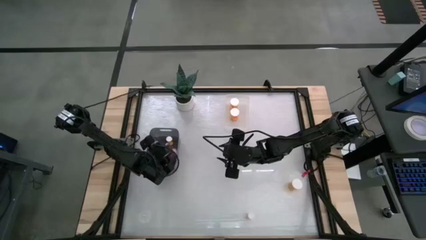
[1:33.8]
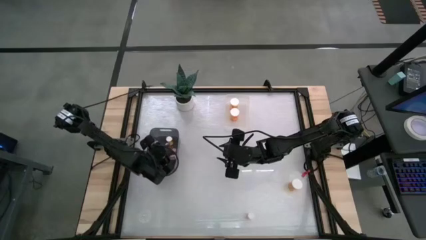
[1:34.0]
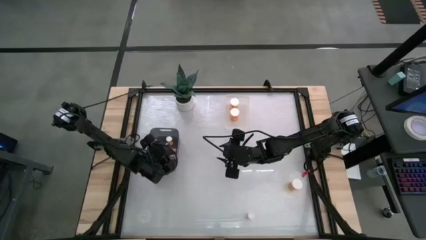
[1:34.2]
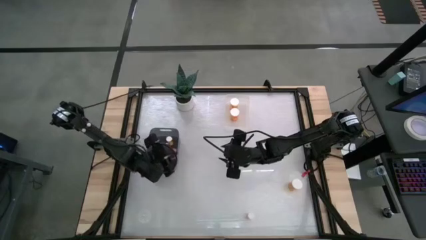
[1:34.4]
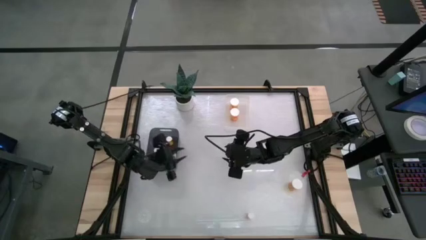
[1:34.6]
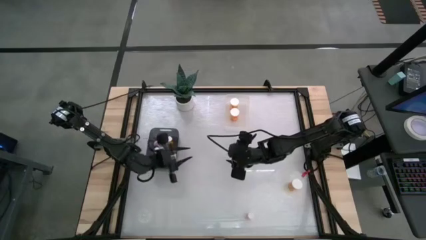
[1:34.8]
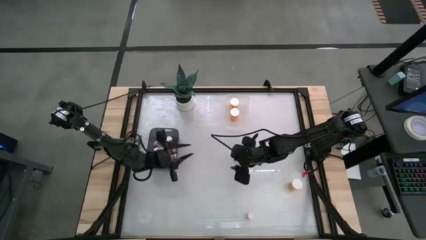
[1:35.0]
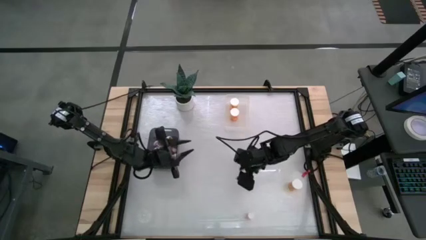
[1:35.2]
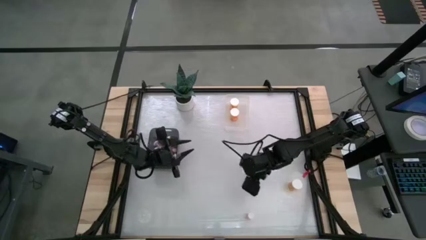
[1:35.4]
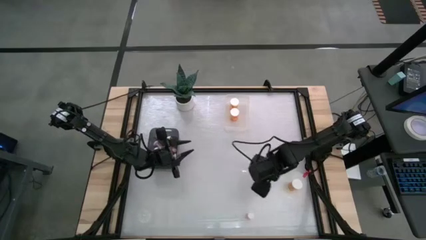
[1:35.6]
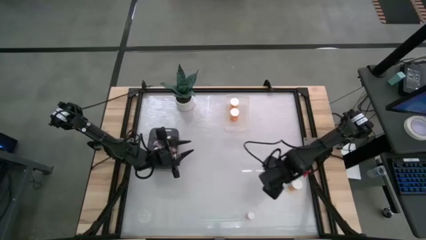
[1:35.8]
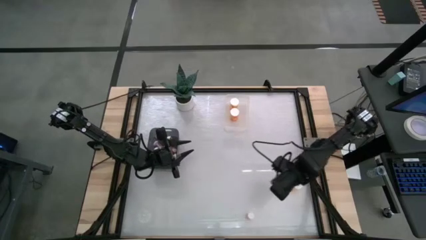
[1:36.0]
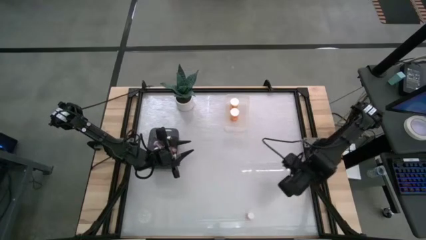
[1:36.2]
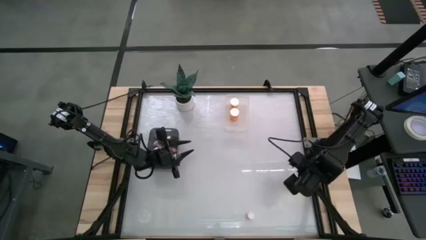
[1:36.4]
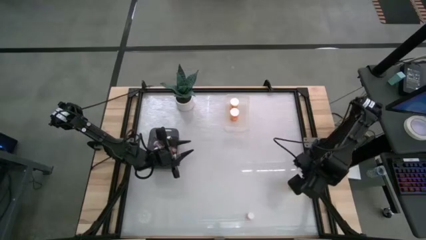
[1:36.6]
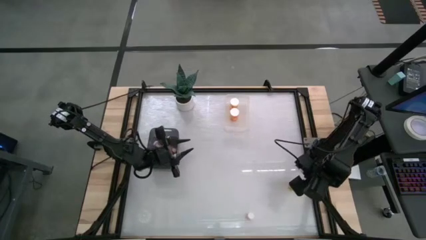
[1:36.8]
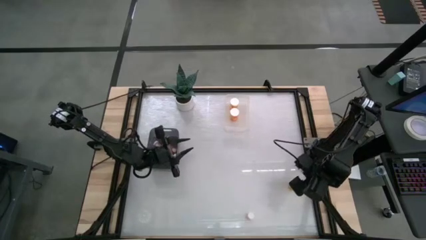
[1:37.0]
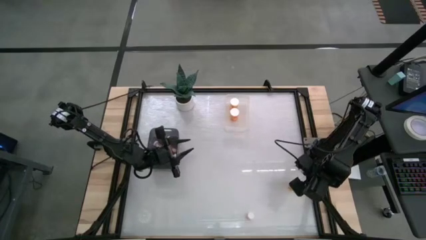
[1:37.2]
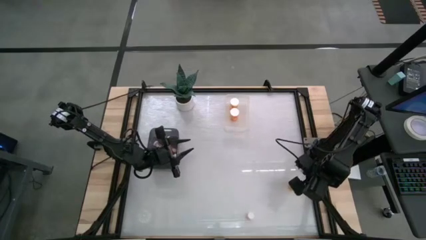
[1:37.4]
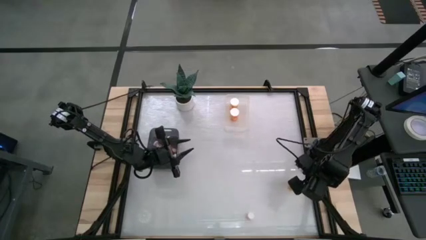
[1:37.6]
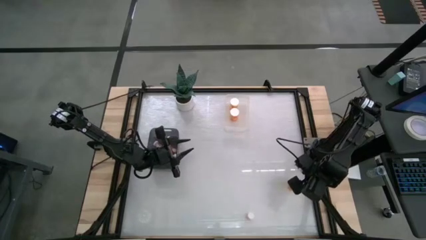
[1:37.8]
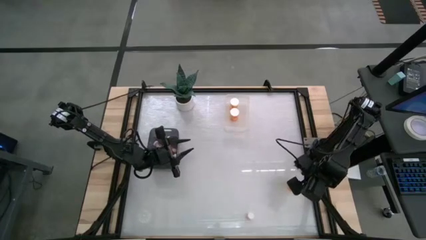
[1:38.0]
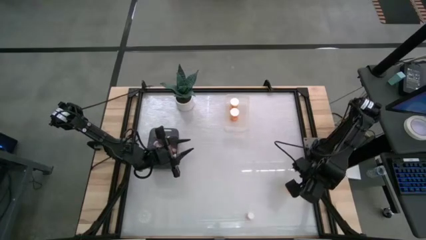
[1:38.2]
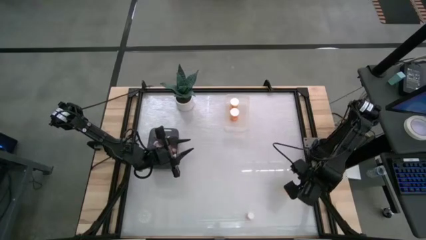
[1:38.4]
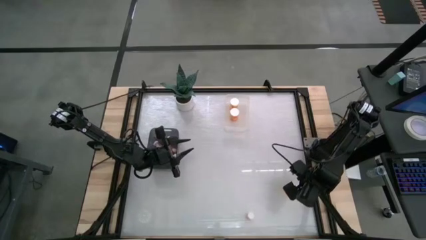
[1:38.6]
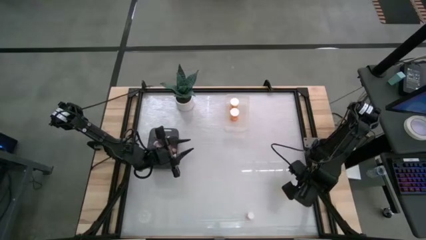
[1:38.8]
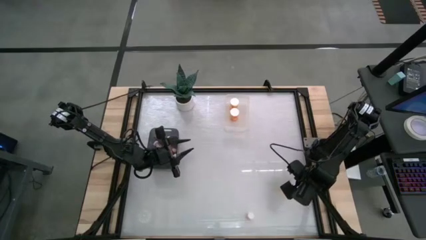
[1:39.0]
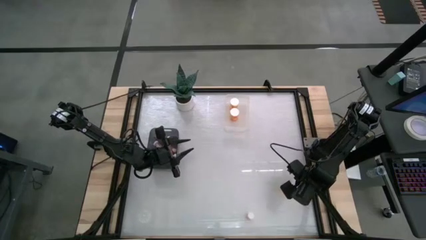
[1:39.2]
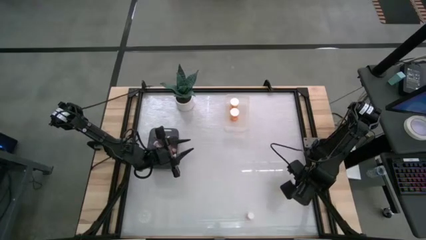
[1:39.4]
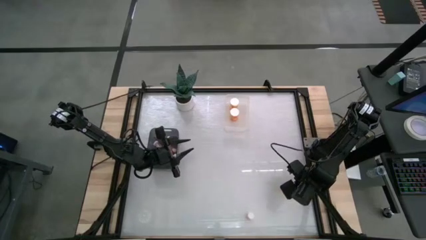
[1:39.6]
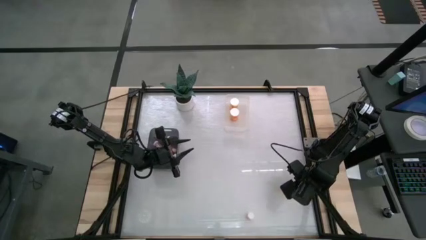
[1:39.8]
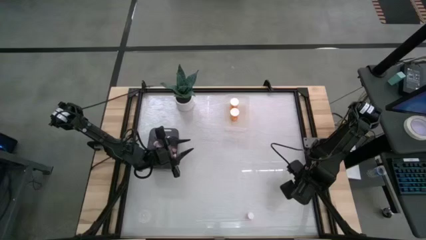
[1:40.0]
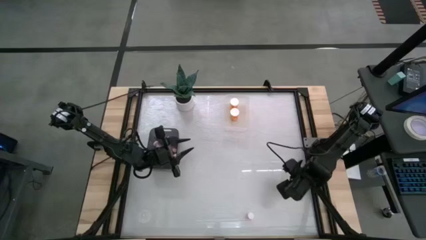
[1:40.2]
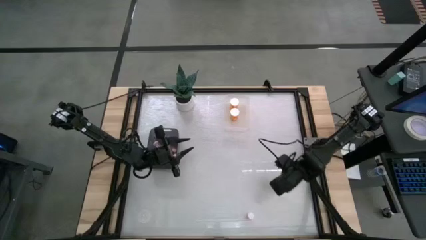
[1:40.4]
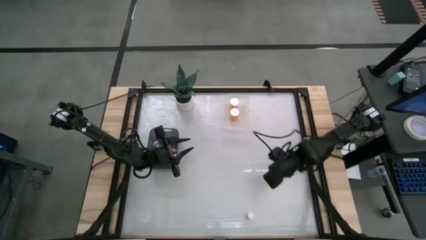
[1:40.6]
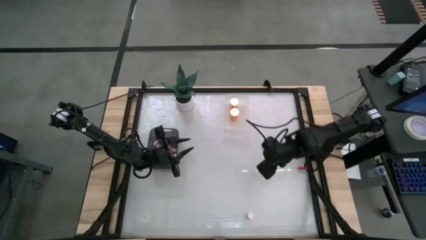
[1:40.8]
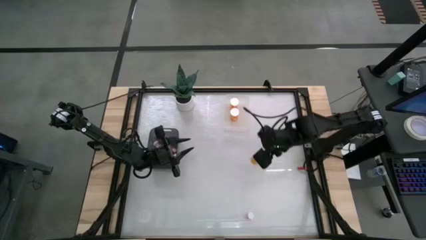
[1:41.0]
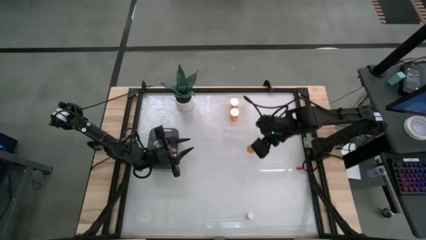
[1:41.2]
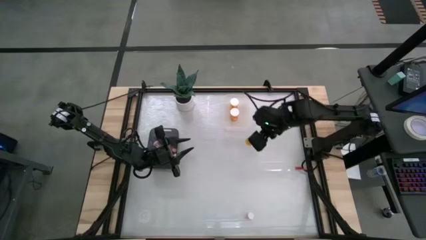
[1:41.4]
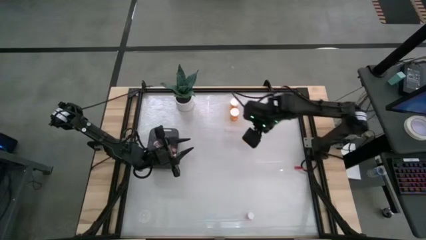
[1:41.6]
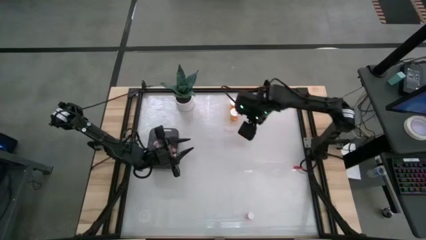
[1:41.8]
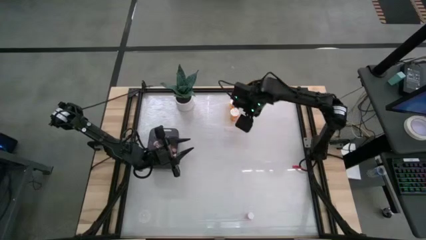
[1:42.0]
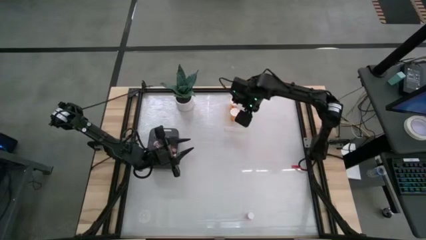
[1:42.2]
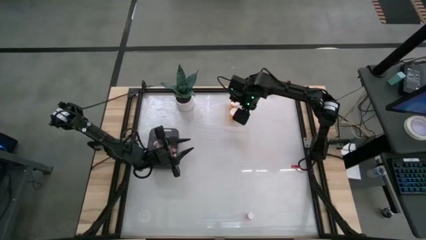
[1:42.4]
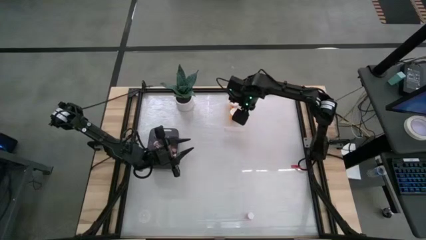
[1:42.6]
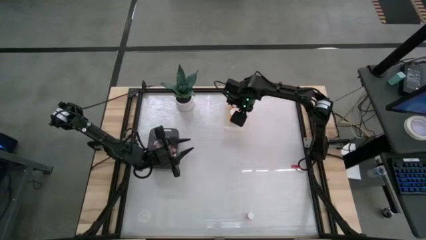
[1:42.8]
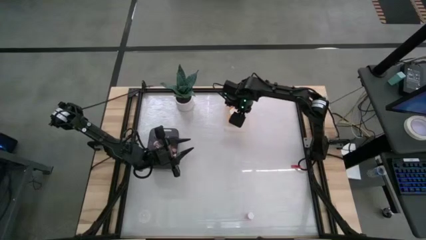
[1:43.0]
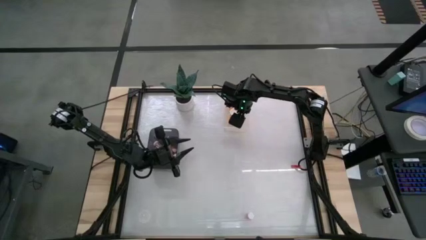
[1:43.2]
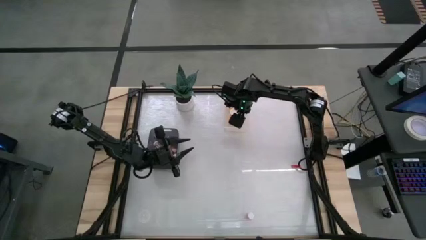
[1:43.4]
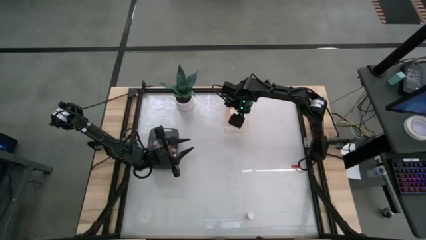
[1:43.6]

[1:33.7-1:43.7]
Task: Pick and place medicine bottles into bin by pill shape (circle, oval)
Put the big orange pill bottle into the transparent bin

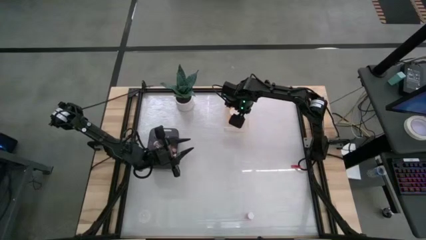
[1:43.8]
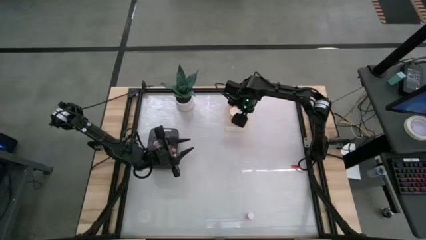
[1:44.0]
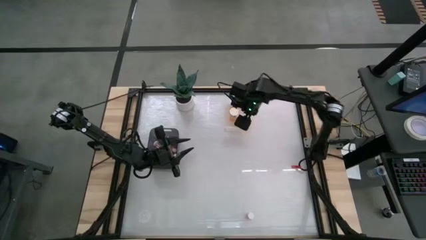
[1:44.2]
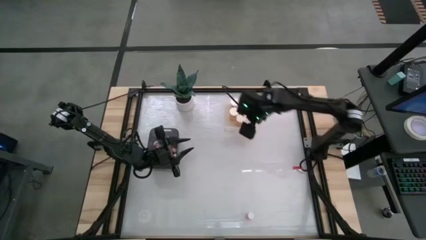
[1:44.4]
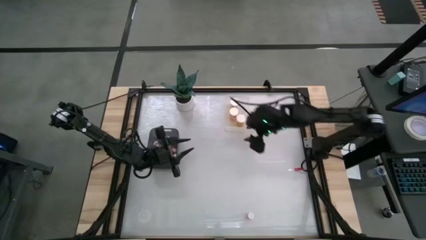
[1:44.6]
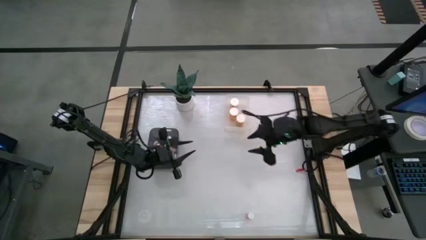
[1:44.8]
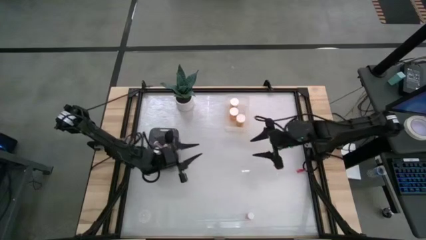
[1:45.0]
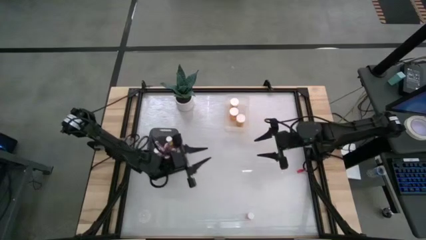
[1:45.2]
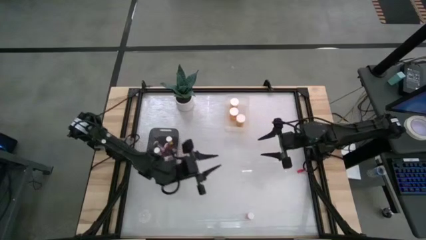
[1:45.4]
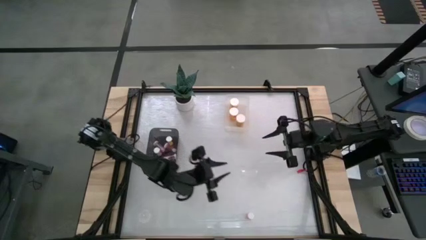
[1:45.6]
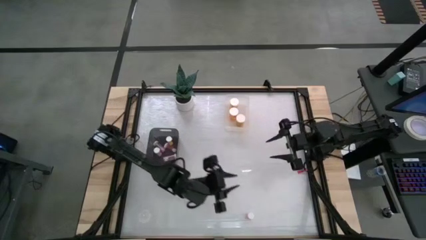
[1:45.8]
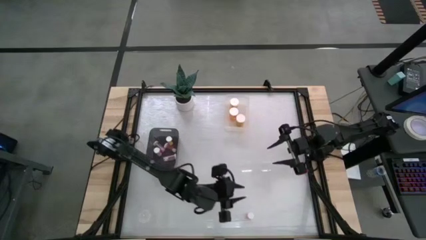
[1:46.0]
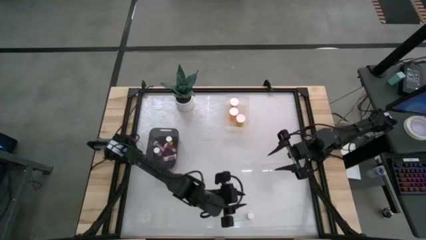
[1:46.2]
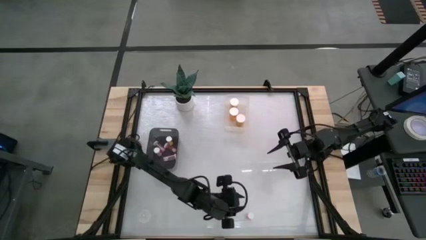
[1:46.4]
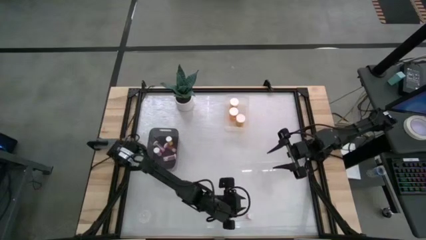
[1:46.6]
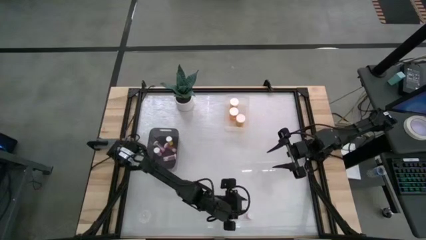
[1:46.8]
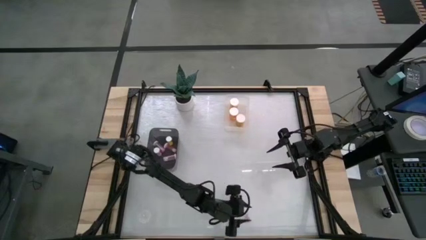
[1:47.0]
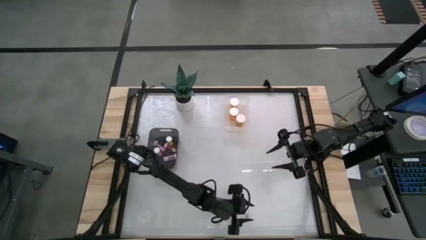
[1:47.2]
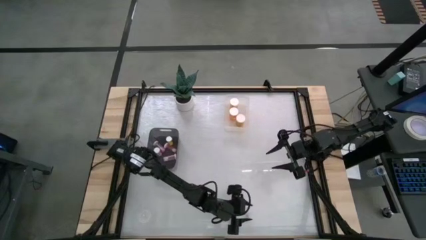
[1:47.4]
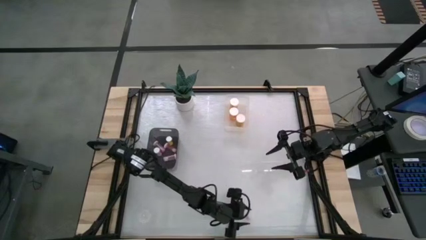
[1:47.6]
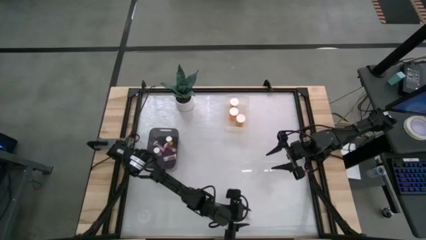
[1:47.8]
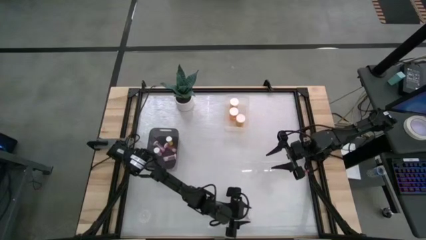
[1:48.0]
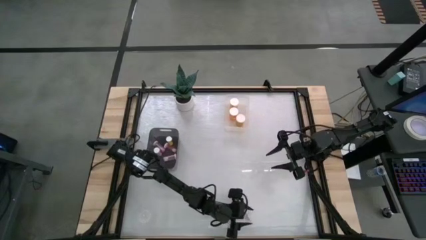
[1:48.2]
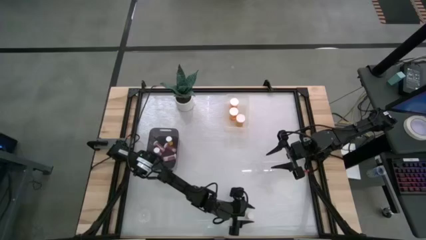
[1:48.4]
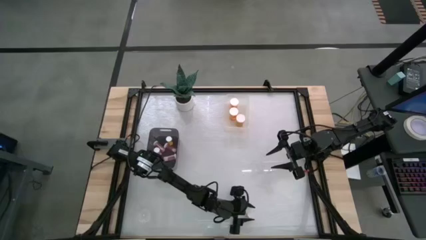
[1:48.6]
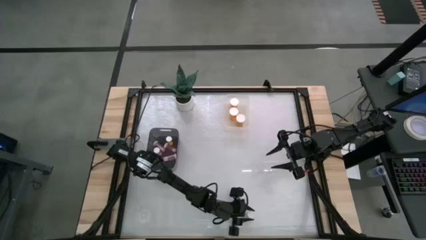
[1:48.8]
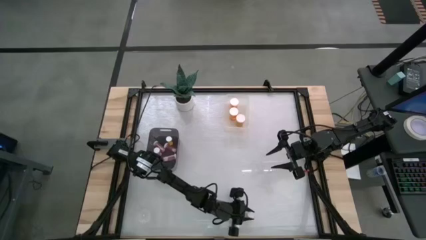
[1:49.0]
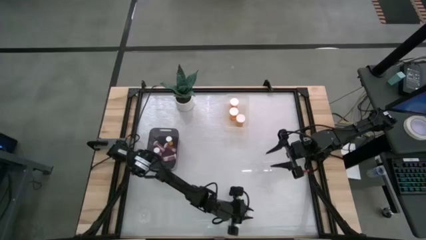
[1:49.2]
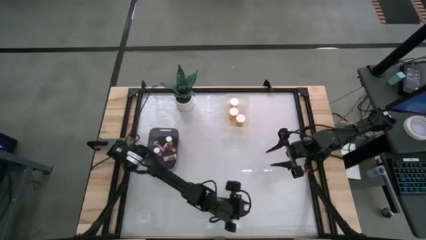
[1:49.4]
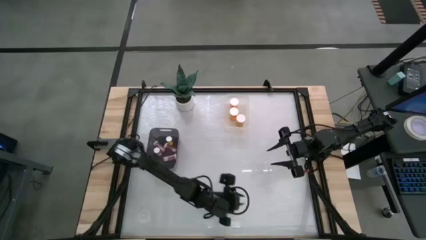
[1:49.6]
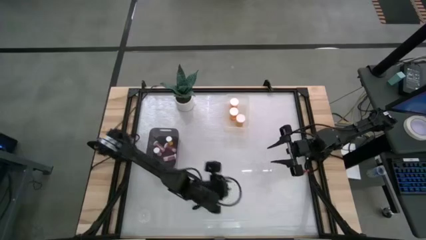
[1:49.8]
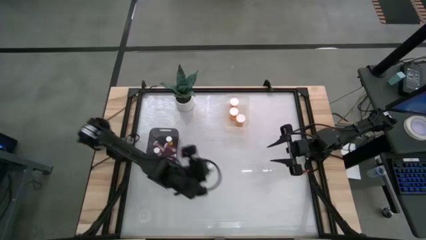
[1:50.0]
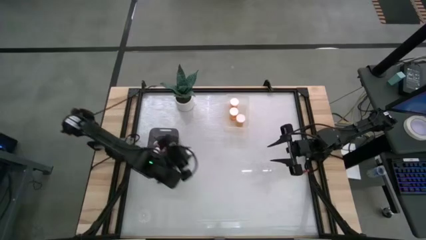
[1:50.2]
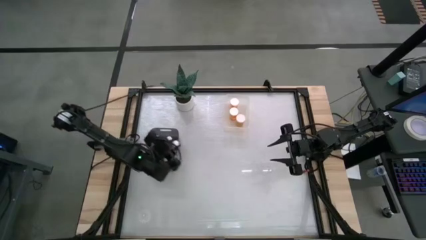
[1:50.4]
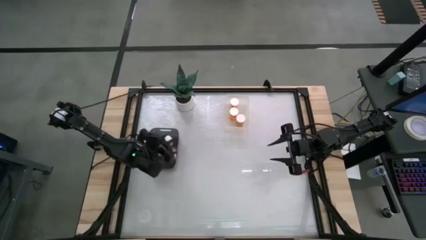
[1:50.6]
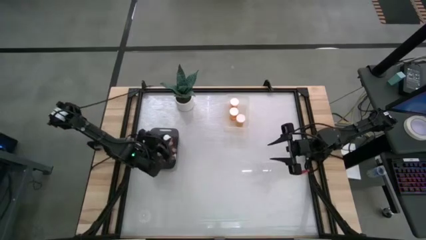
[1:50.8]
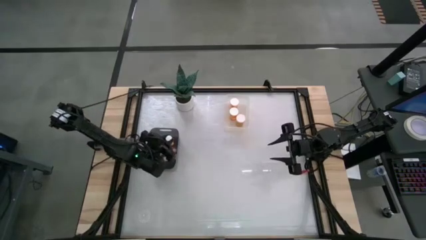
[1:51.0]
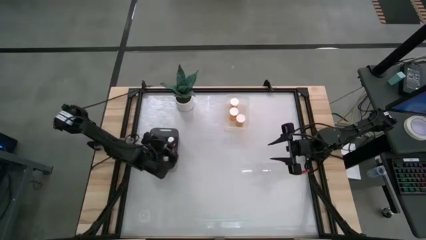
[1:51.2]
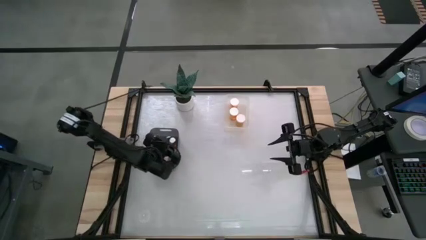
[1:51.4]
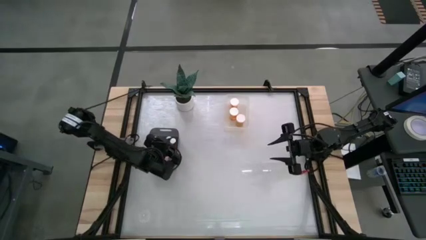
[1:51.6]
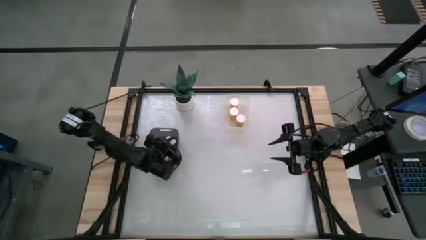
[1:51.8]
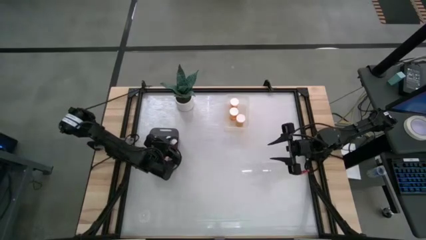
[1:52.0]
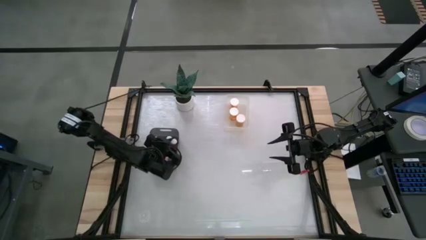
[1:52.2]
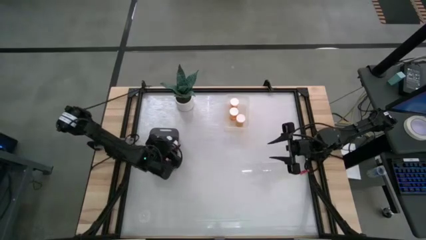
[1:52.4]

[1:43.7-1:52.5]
Put the small pink pill bottle into the black bin
